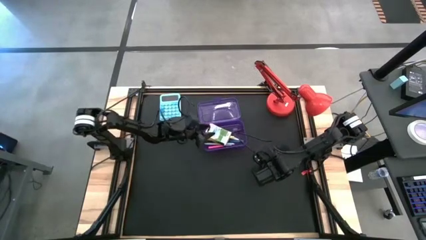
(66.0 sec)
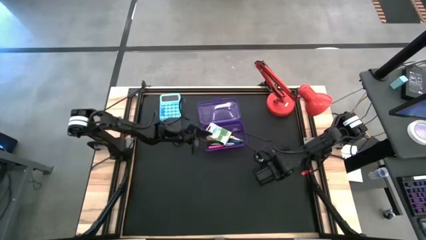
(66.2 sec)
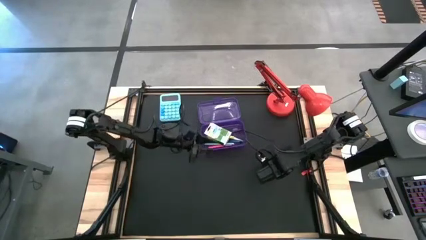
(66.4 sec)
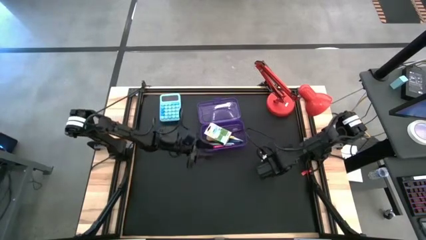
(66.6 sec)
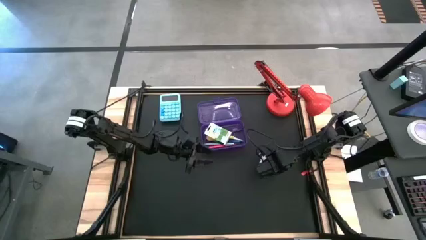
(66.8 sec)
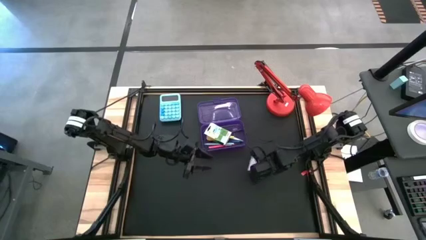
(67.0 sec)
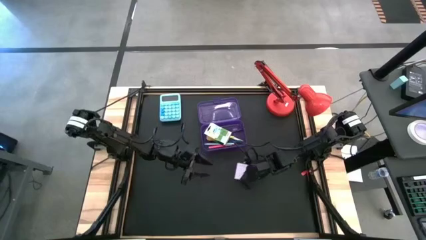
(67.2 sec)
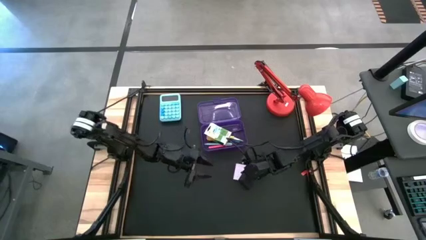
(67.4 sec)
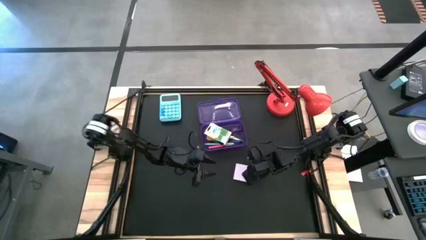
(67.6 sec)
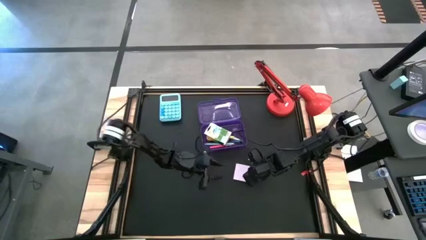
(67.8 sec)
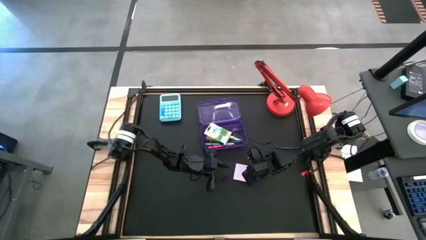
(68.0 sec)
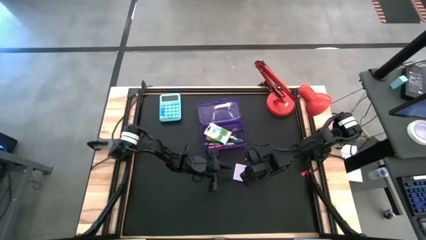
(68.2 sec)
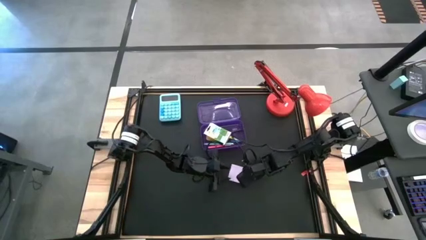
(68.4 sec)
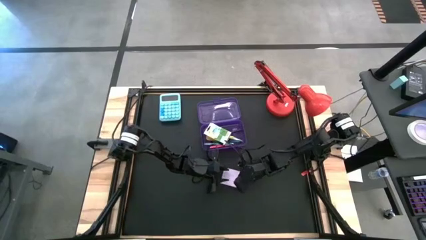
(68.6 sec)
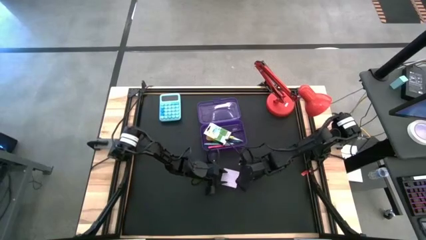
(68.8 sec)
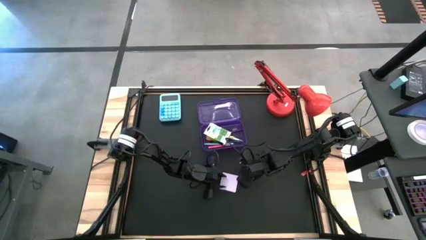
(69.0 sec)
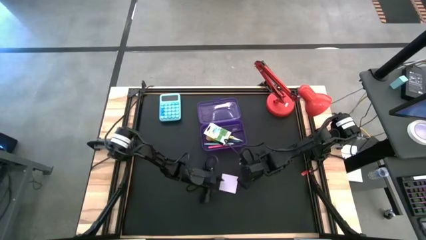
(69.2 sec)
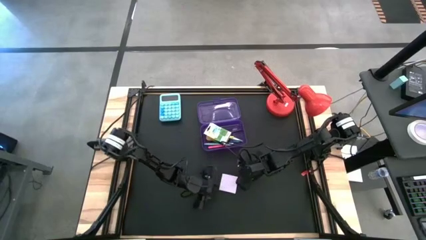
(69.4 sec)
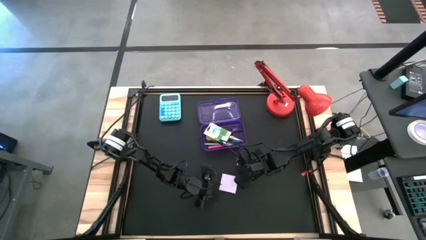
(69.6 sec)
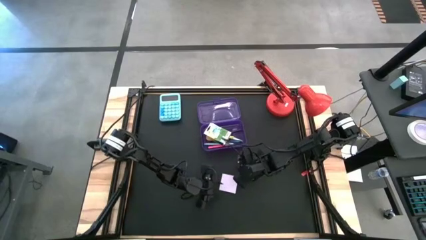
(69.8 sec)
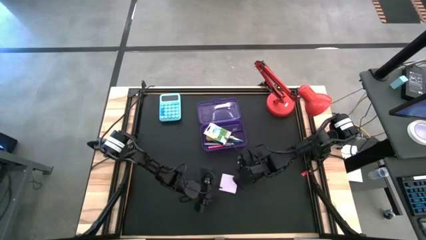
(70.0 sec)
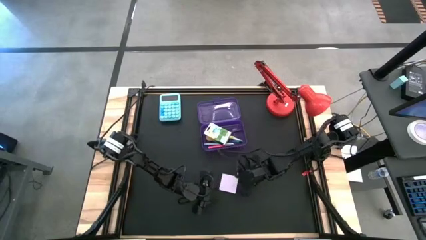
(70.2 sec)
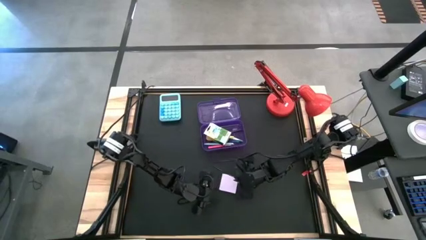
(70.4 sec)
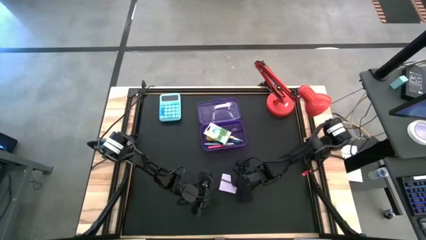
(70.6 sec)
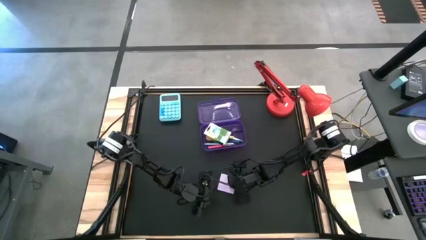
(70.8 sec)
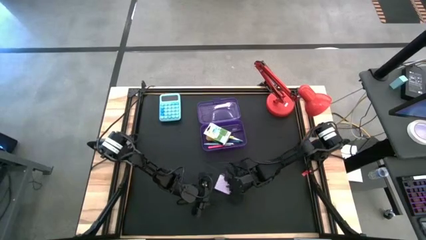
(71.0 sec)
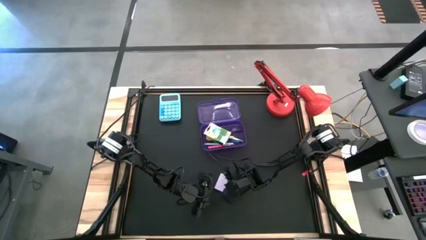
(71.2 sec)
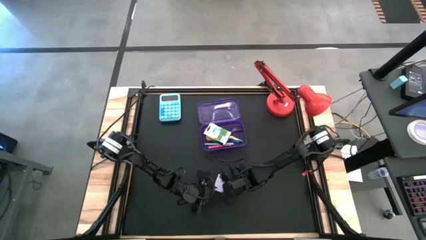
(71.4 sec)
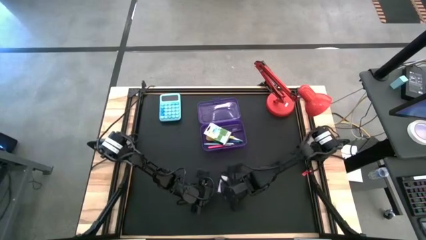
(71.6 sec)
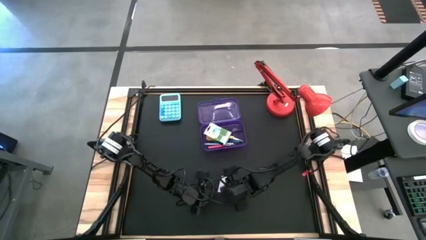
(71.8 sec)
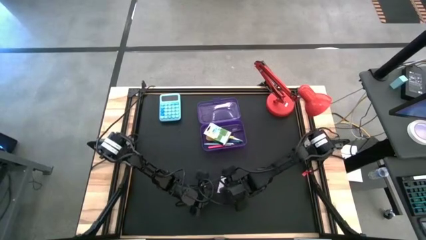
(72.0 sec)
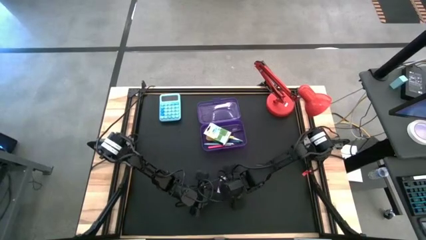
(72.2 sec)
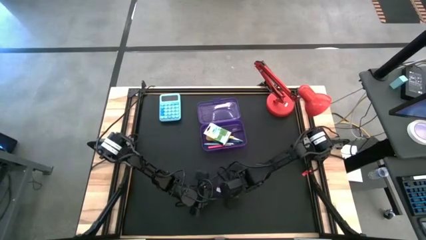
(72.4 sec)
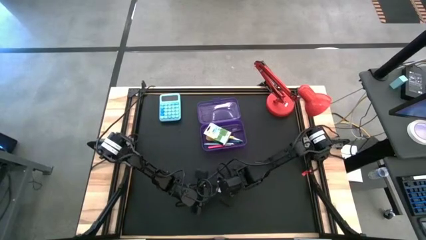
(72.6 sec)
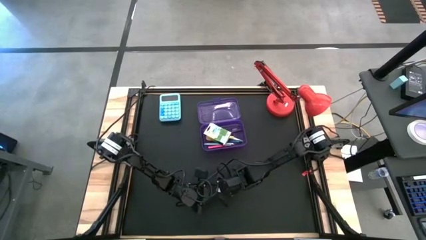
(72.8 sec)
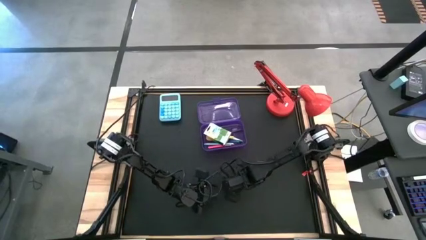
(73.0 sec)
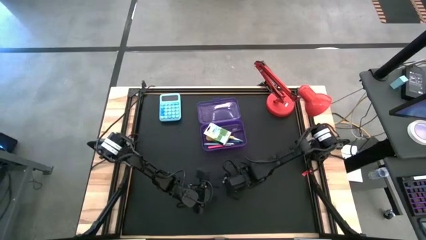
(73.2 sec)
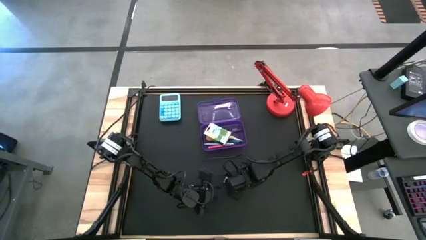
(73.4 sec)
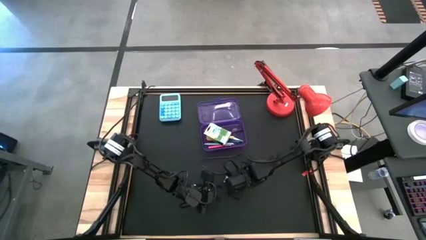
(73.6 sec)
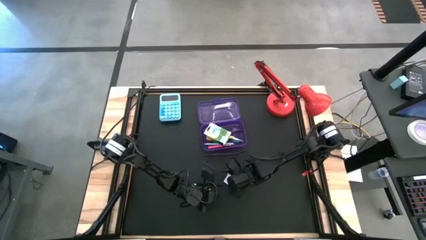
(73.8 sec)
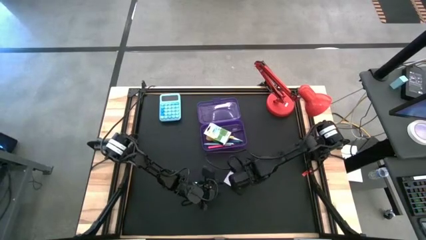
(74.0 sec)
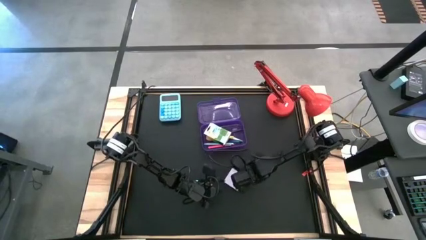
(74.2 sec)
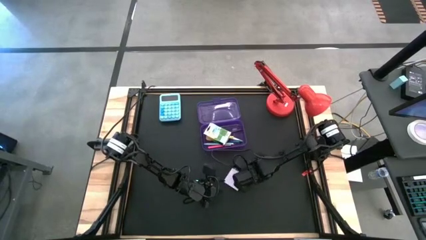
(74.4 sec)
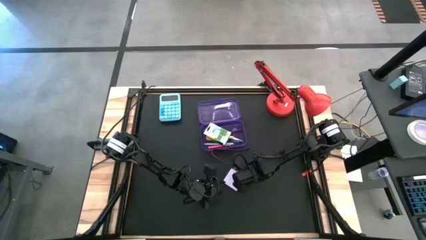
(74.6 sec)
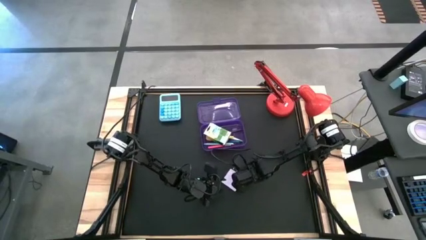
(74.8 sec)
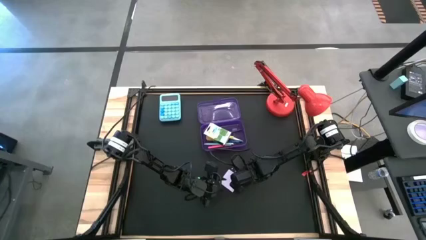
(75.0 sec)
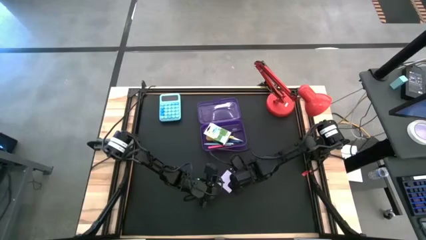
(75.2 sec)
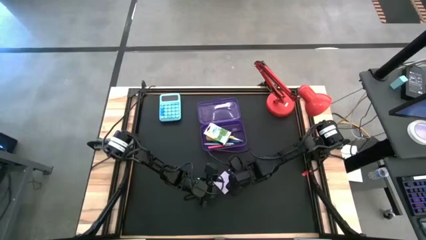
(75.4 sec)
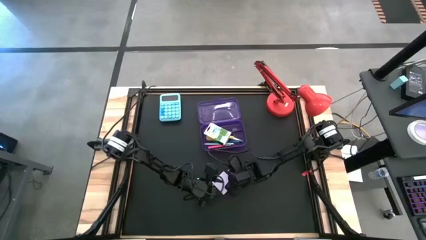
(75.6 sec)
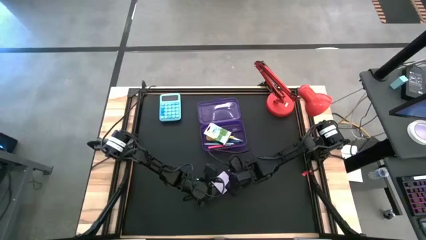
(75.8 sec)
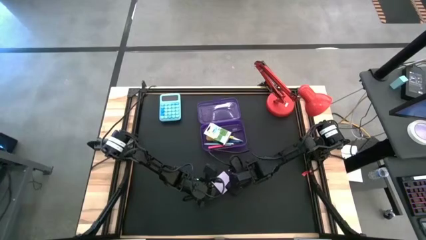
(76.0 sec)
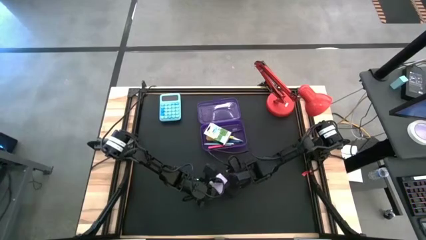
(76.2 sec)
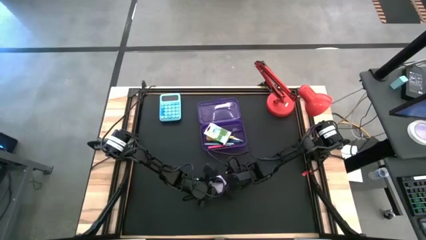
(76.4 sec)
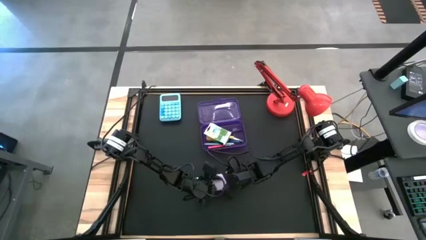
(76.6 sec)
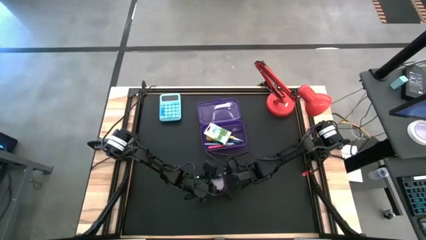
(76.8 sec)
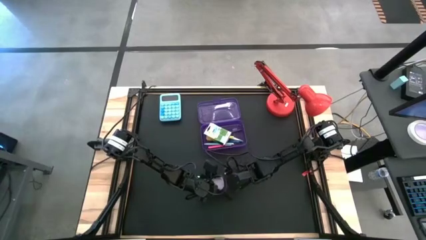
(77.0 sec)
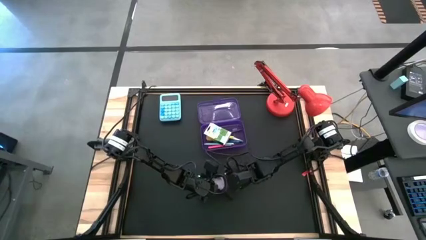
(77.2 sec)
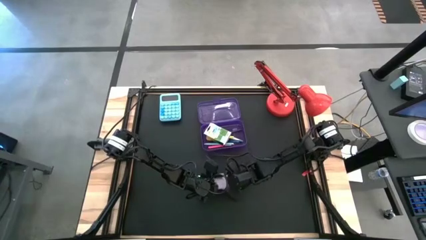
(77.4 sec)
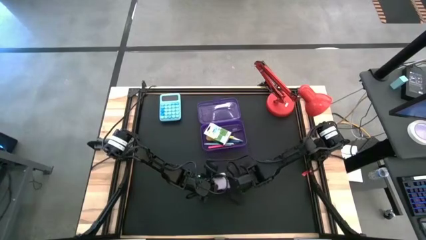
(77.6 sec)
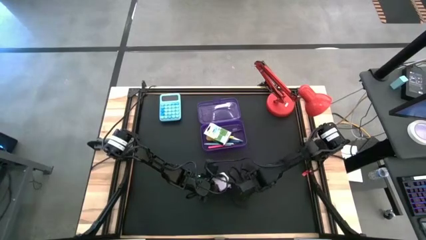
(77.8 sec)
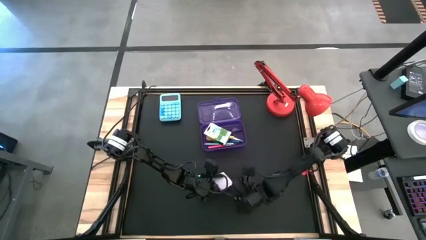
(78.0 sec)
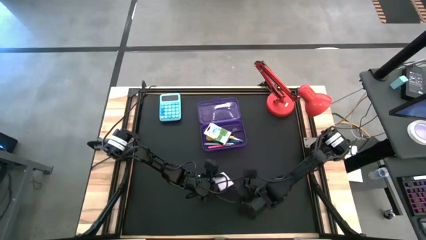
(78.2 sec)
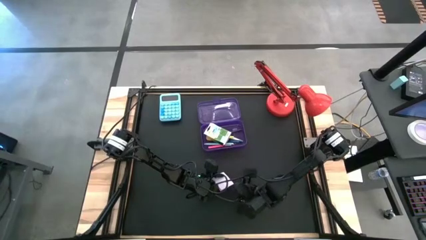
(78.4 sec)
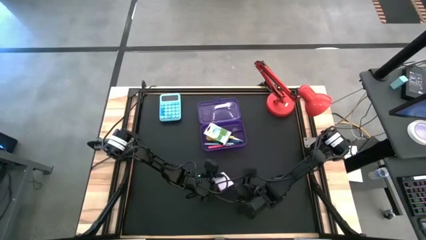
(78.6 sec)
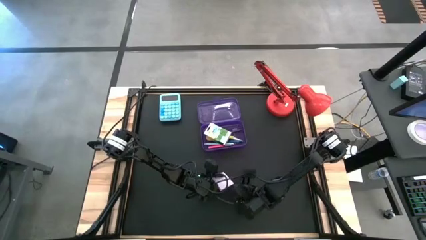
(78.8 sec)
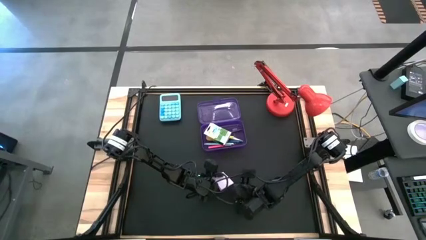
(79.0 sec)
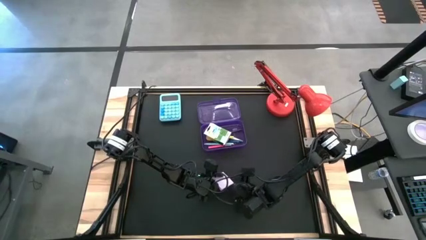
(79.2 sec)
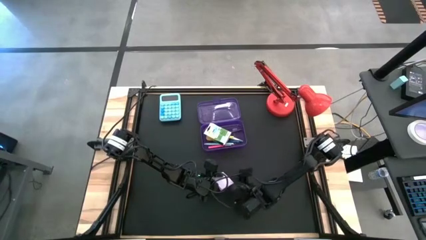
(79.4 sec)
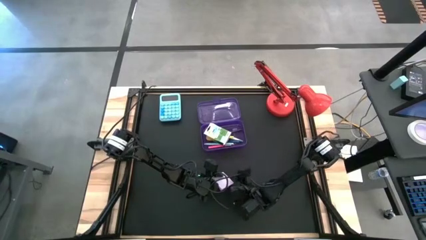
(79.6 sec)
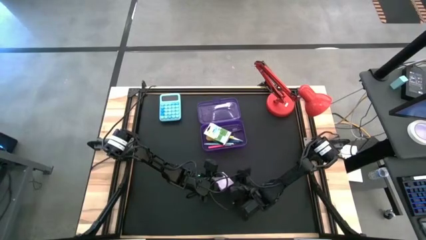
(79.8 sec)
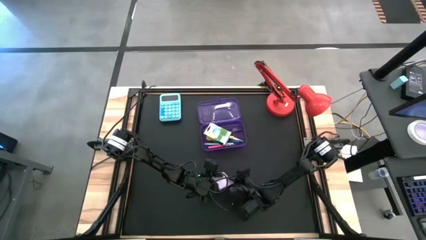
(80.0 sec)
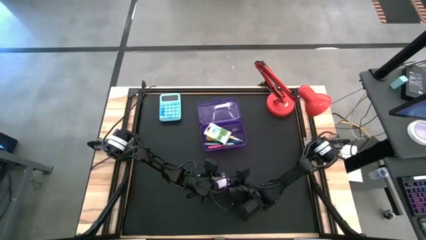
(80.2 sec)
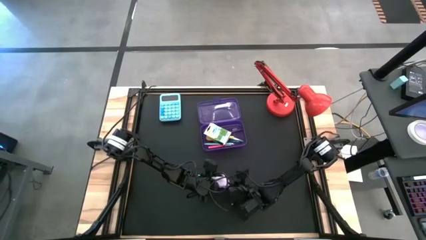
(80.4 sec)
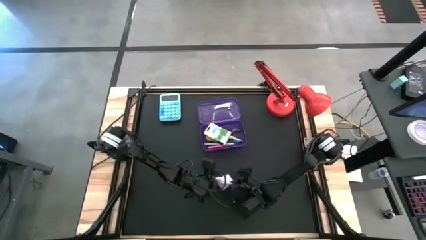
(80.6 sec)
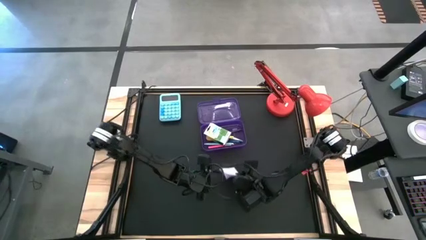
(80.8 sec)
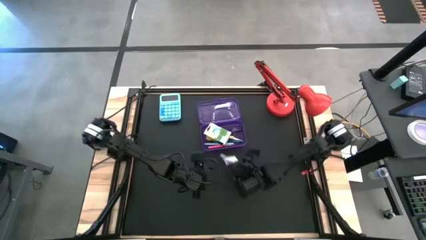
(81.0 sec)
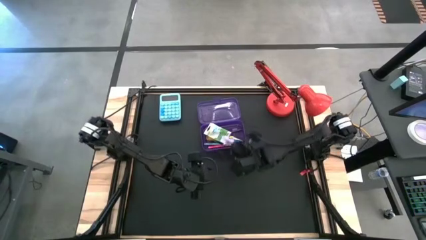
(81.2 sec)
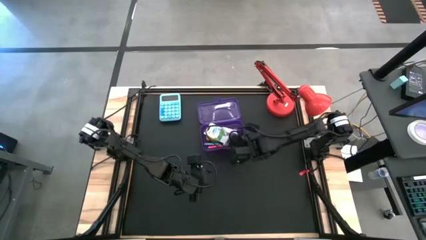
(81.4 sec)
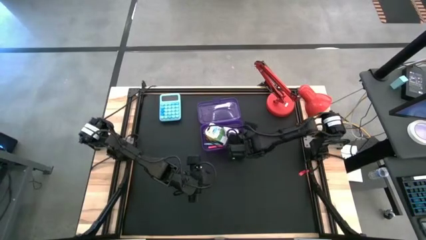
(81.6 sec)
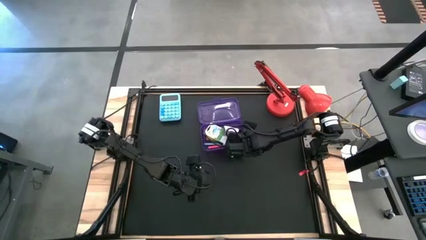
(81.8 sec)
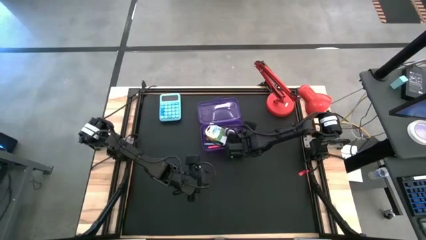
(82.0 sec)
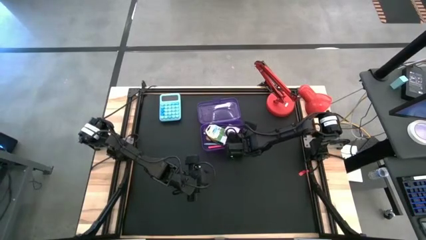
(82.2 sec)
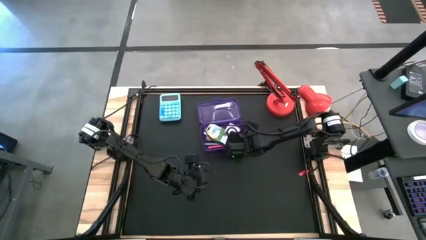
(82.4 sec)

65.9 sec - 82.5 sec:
Task: Pack school essentials
Put the white sticky notes into the violet supply box
